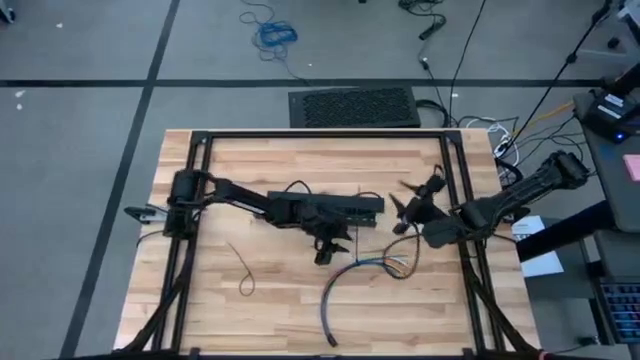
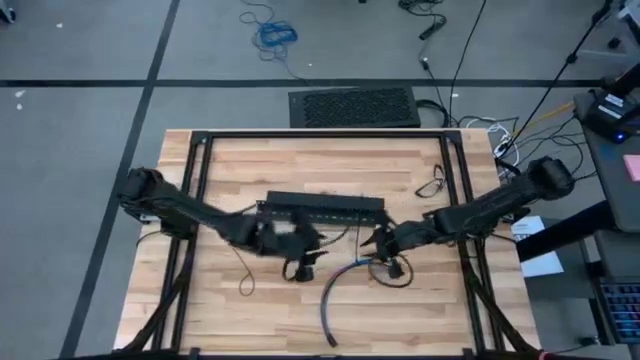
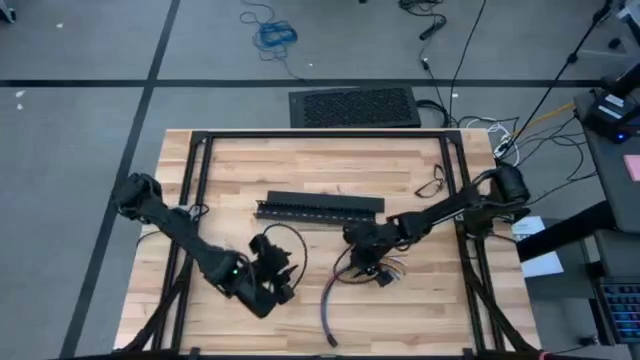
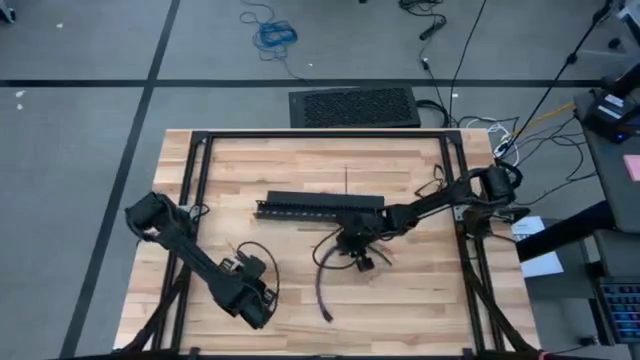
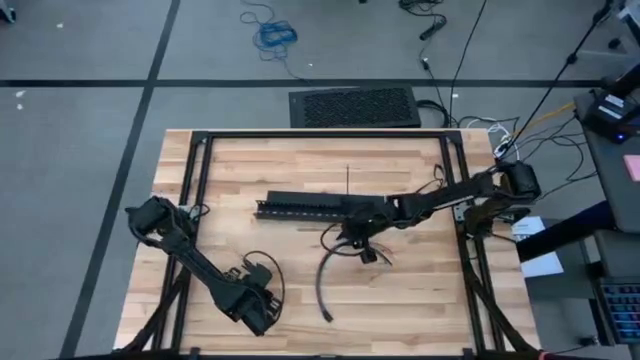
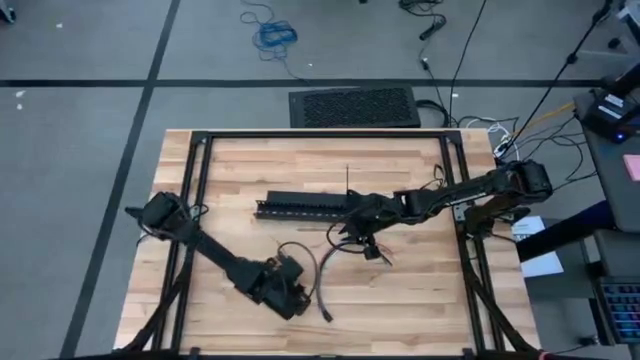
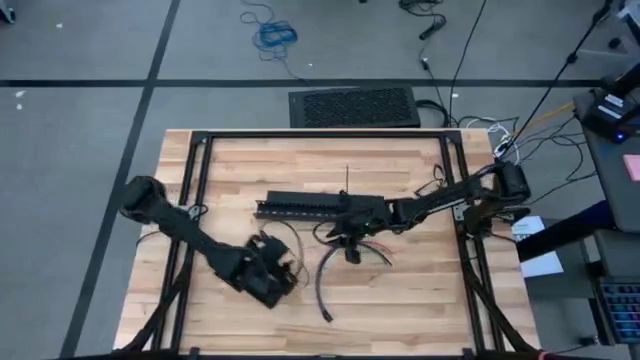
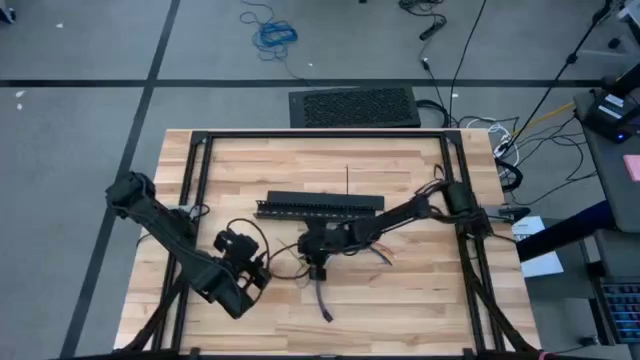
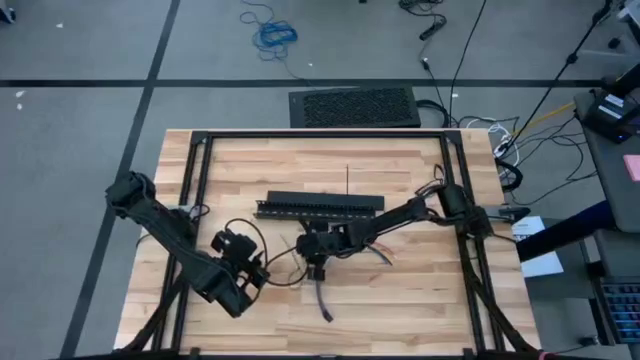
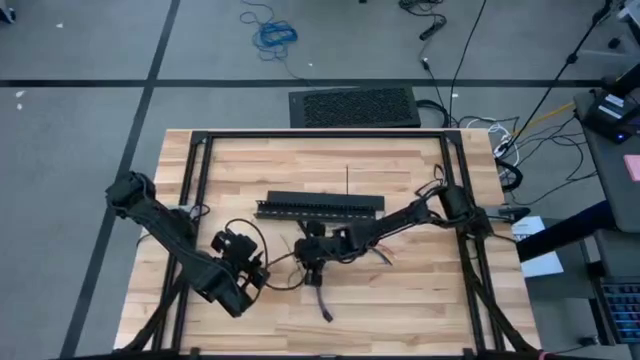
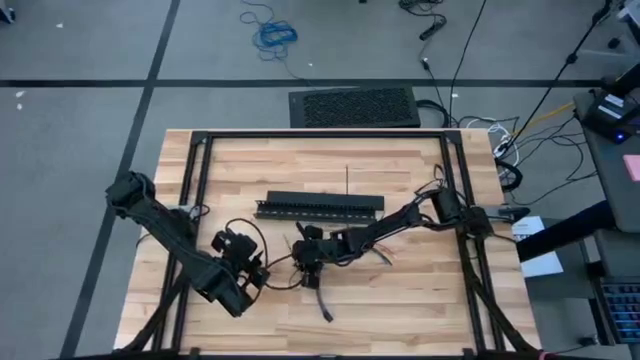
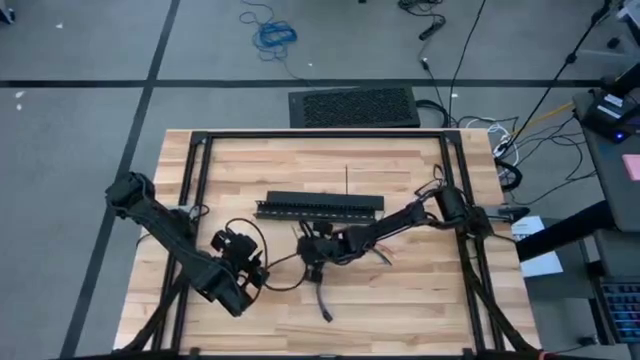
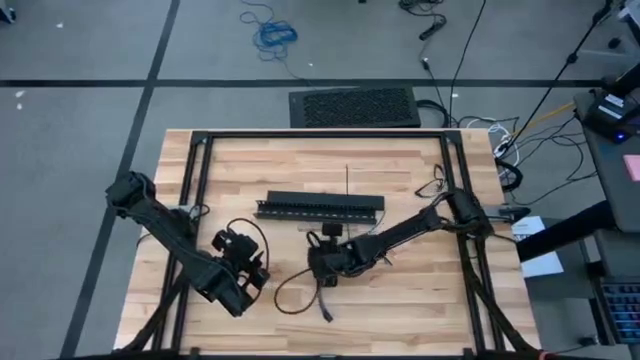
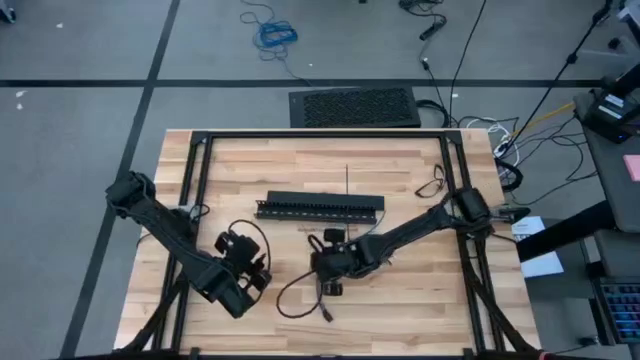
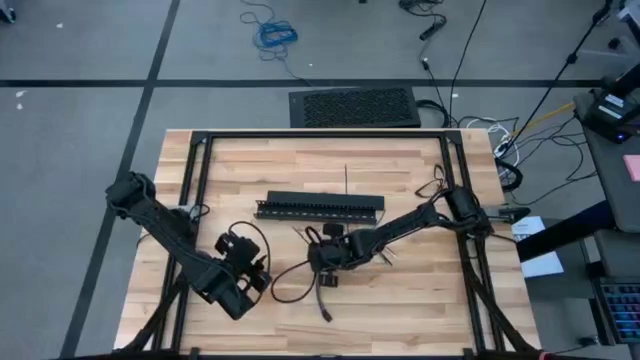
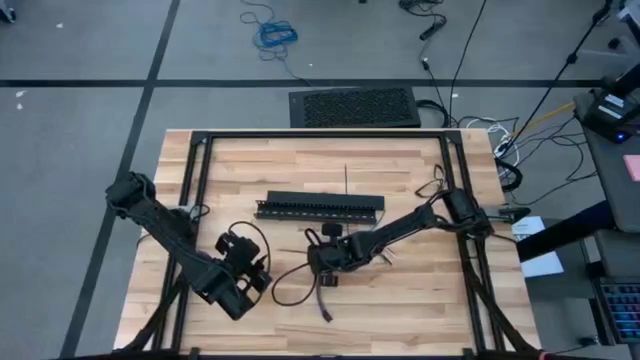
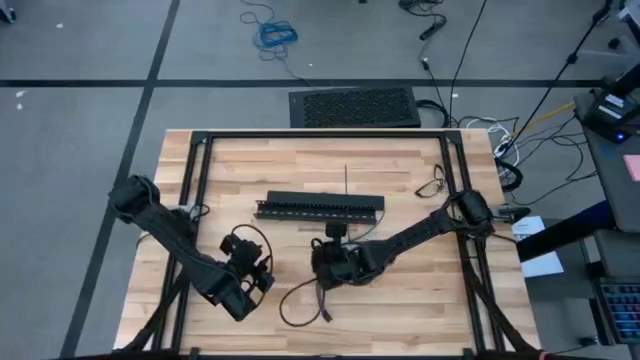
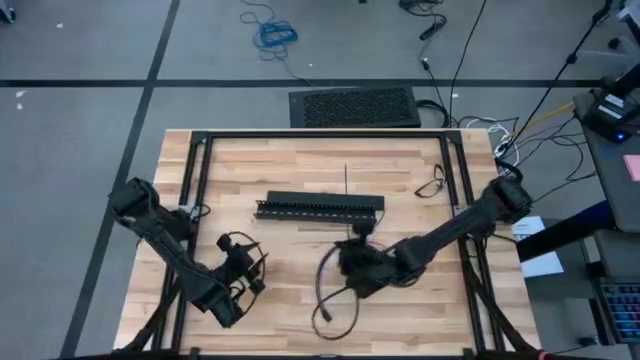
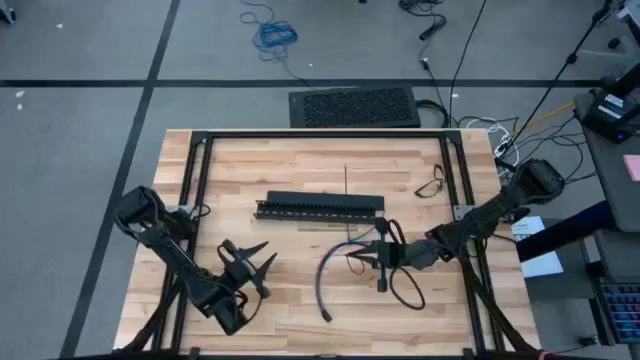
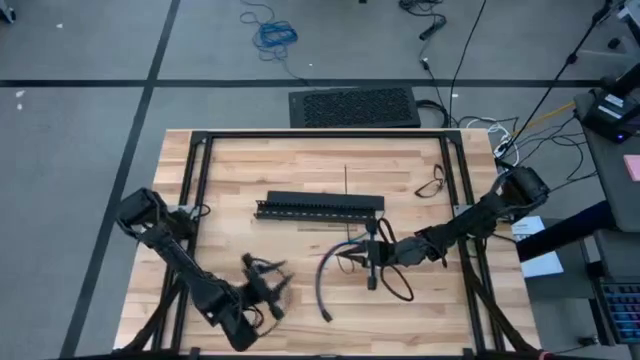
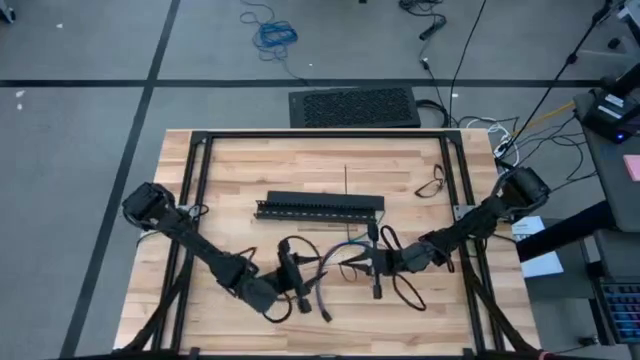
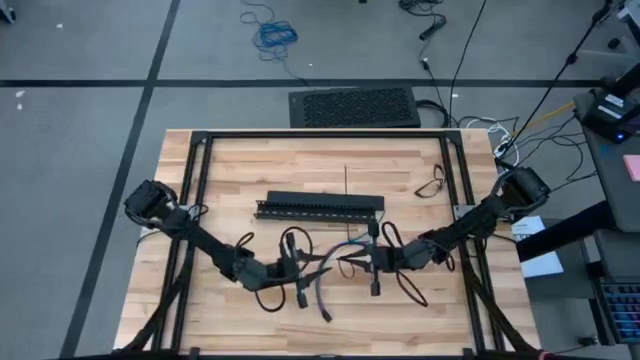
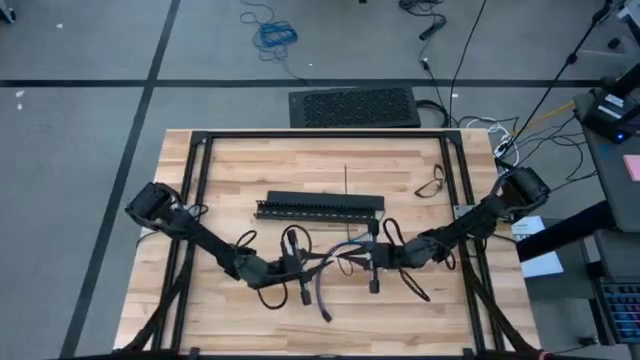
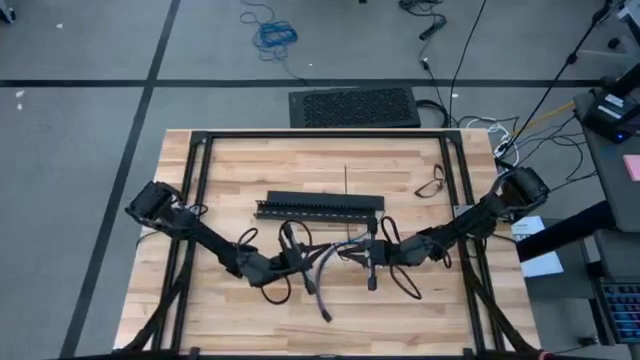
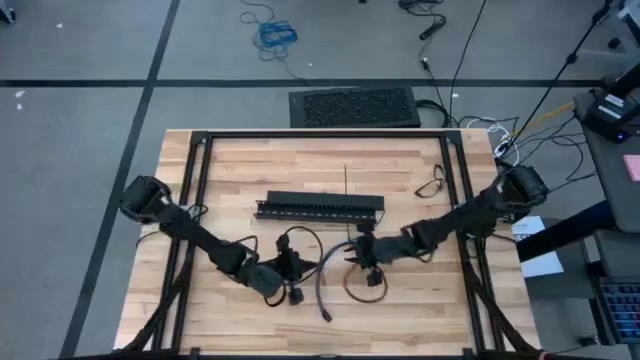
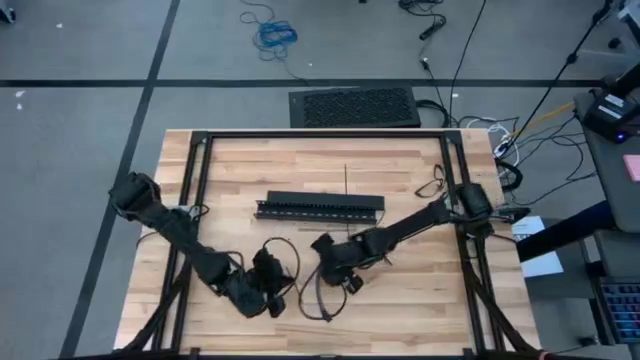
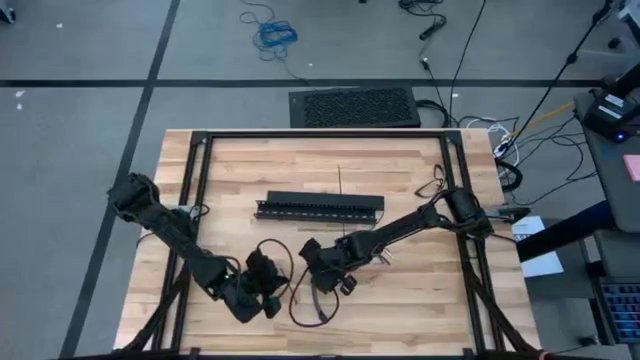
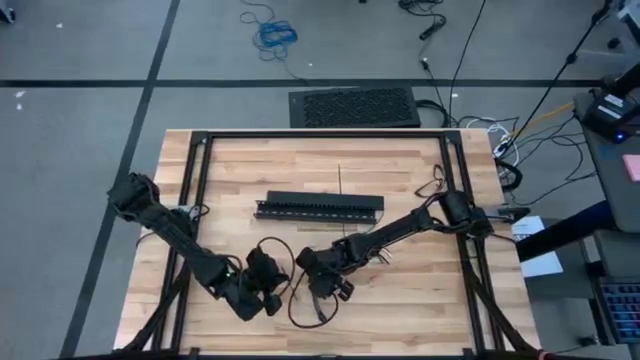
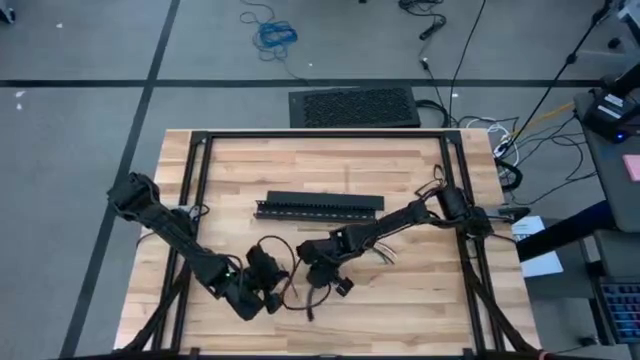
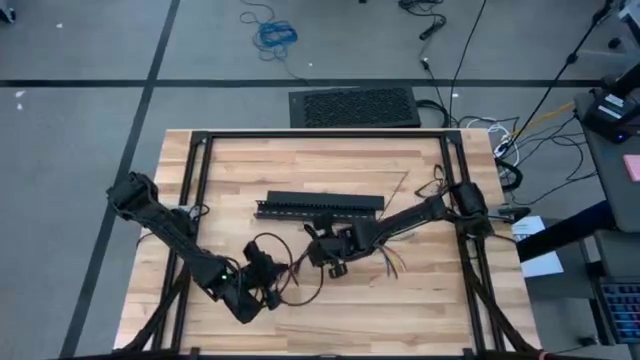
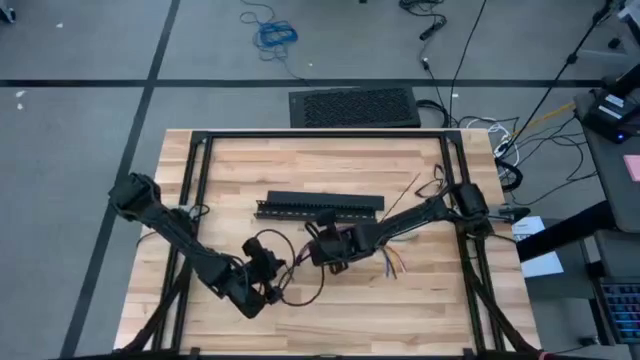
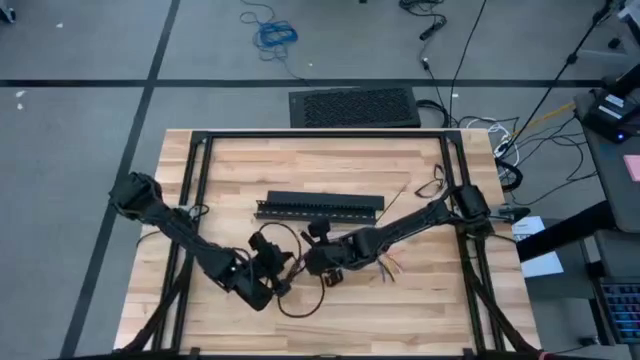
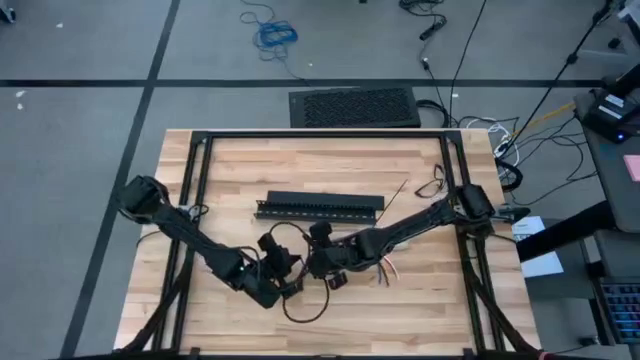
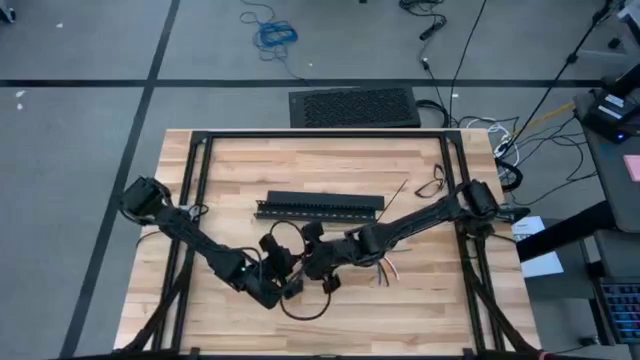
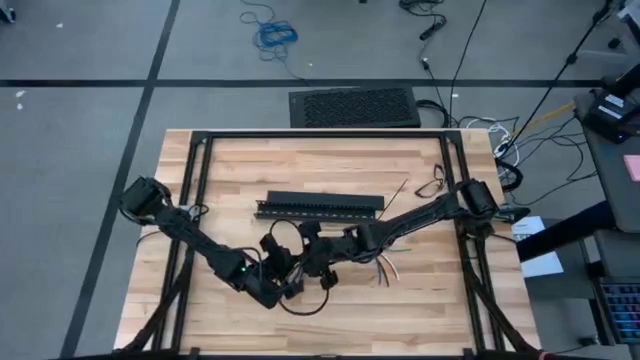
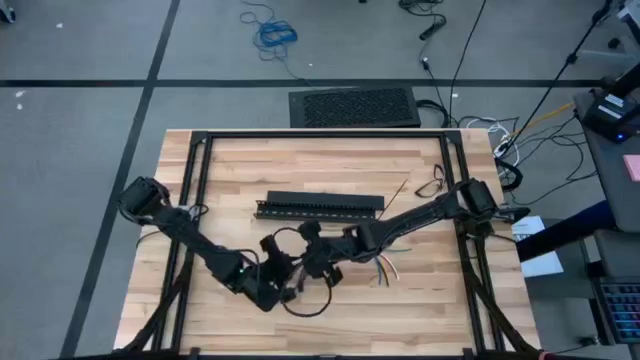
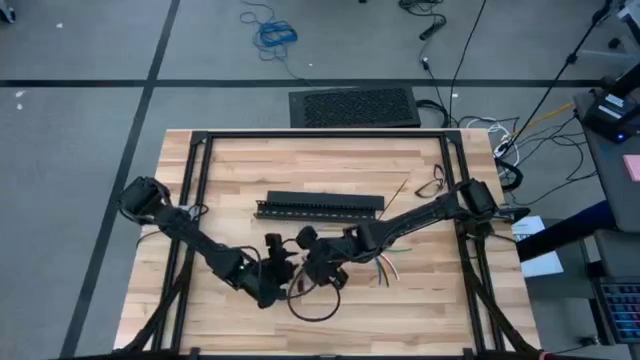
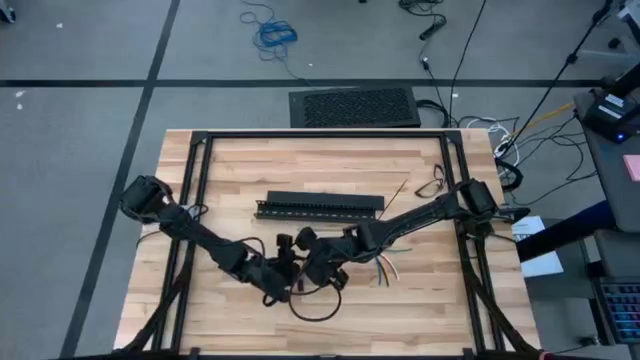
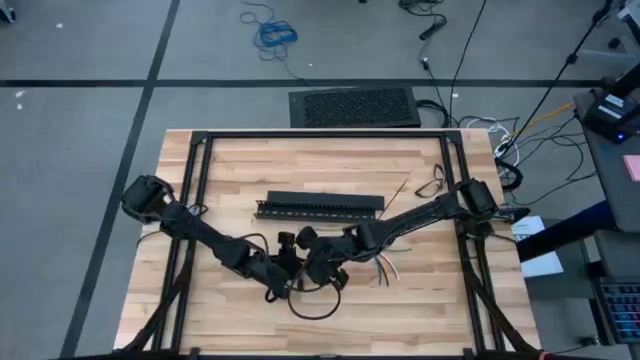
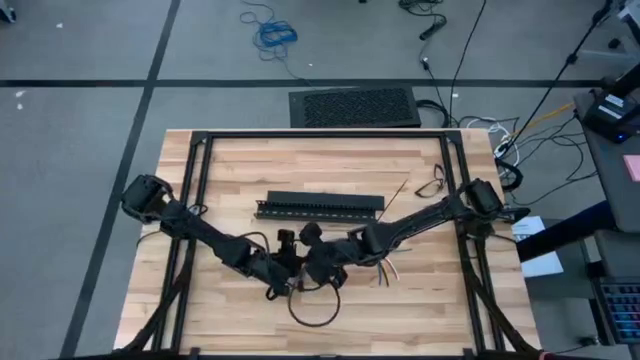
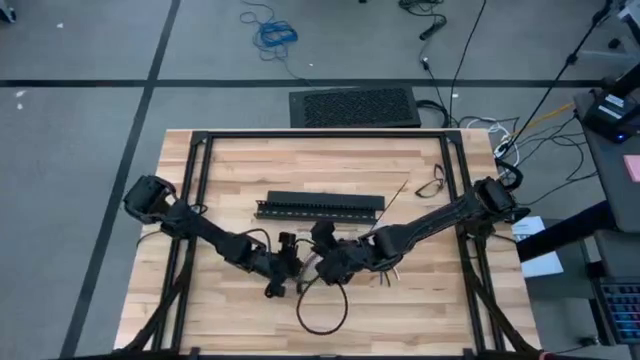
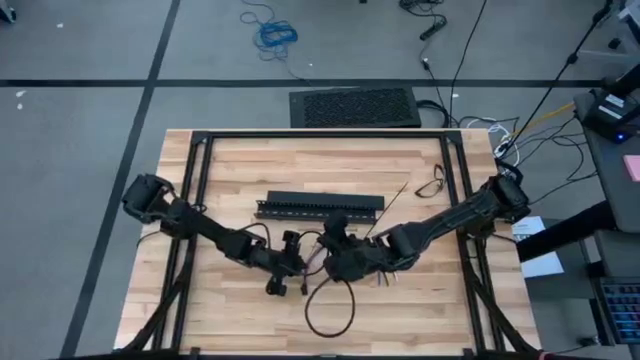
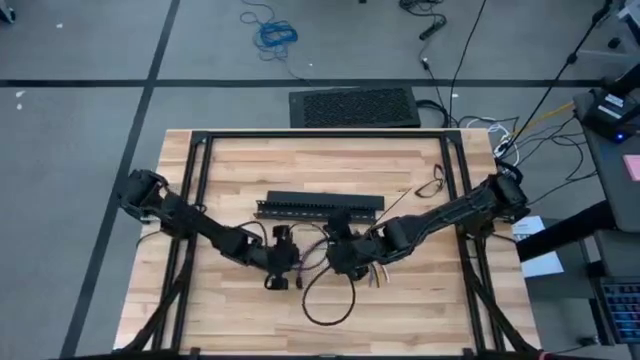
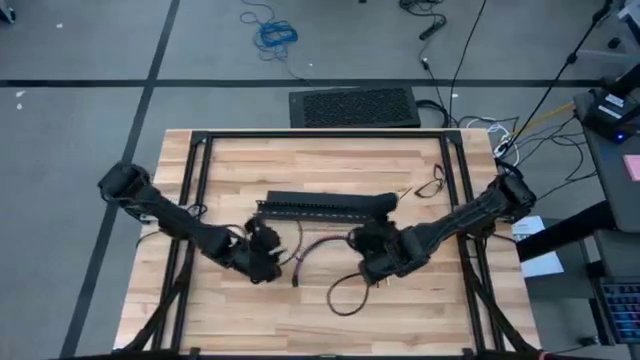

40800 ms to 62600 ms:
Task: Ziptie cables
Wrap the black zip tie on the cables
